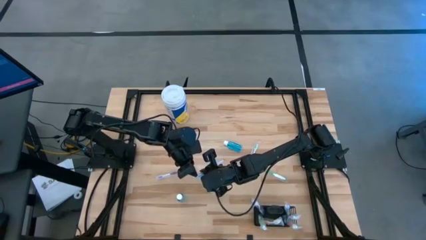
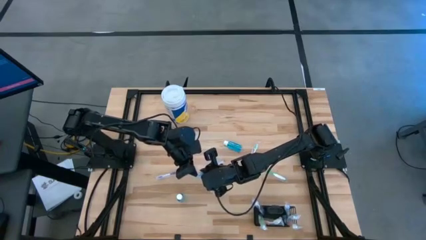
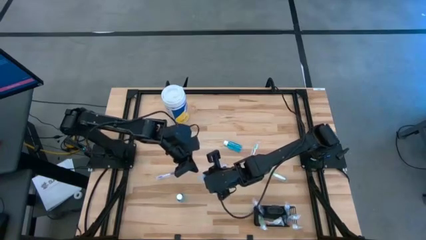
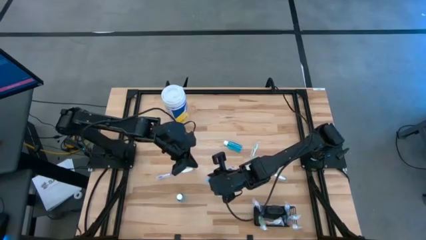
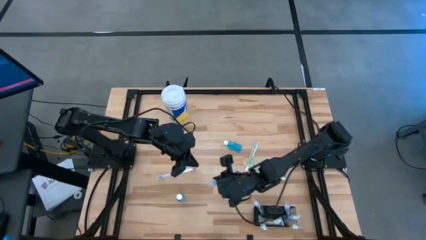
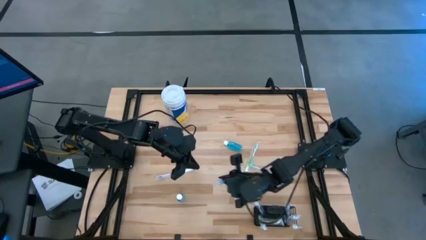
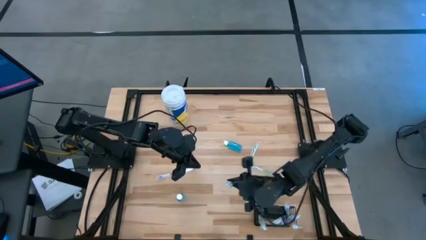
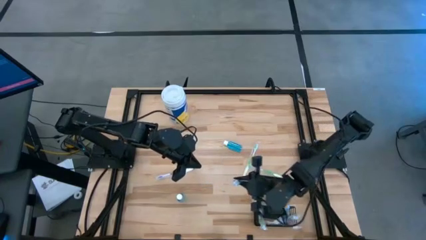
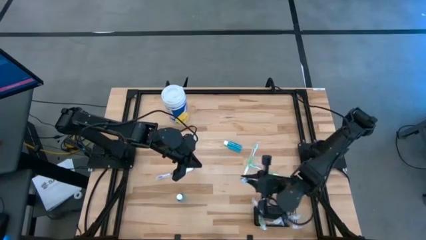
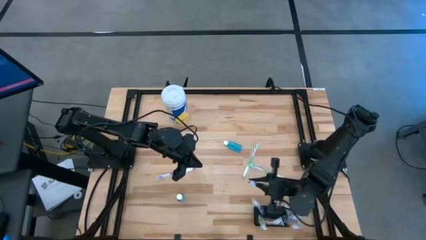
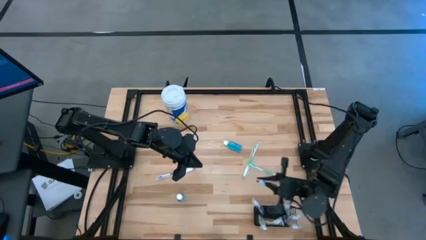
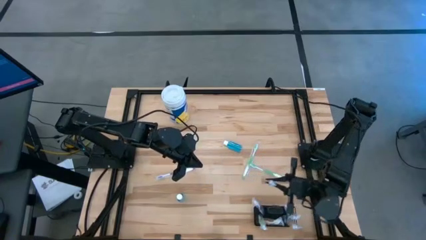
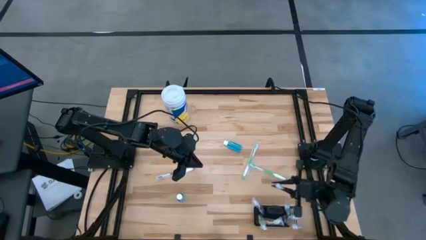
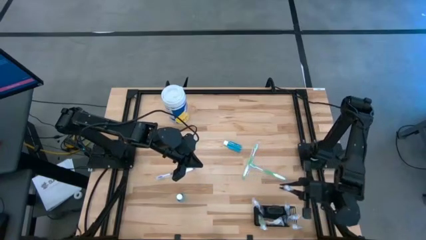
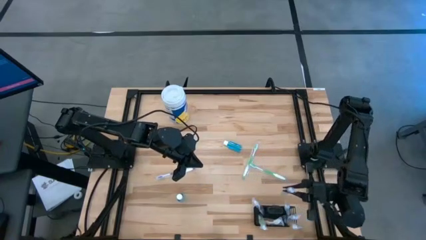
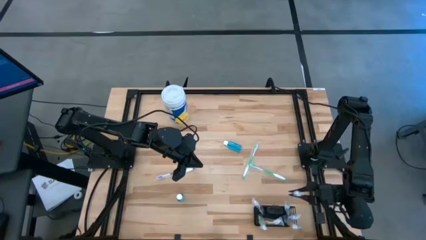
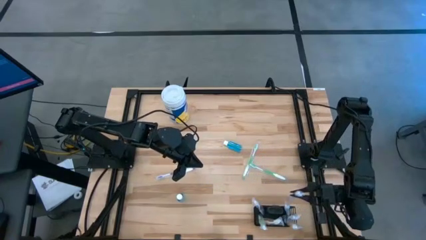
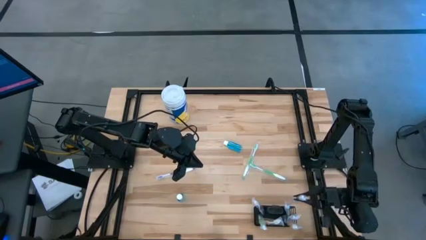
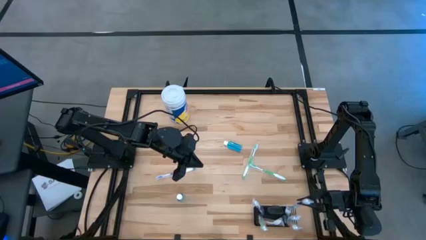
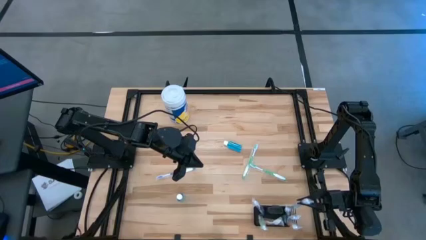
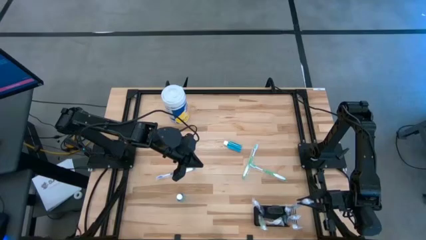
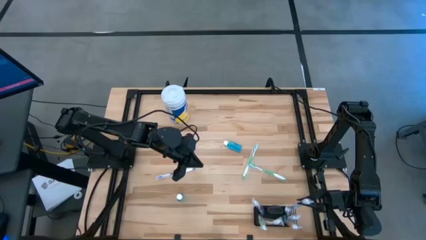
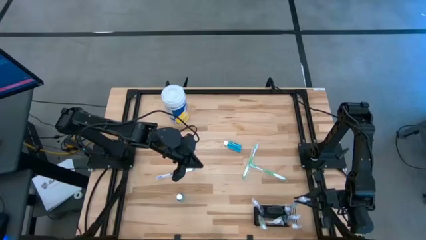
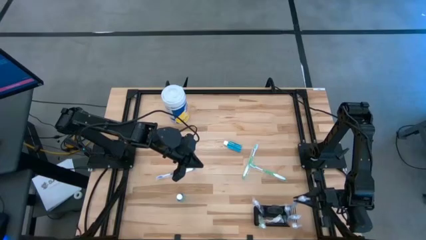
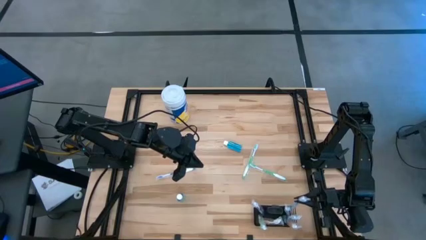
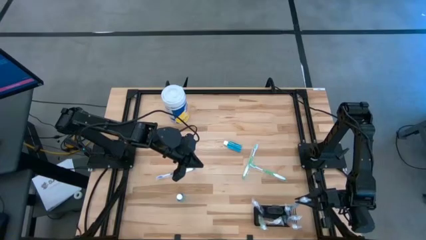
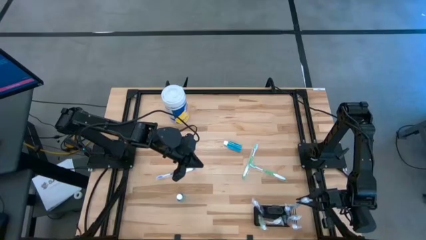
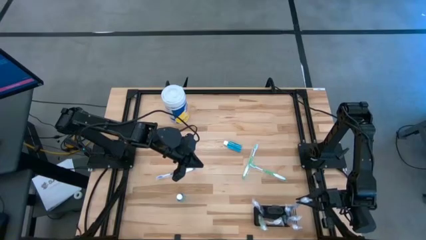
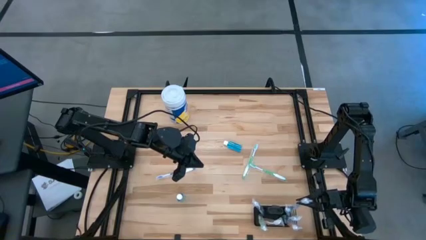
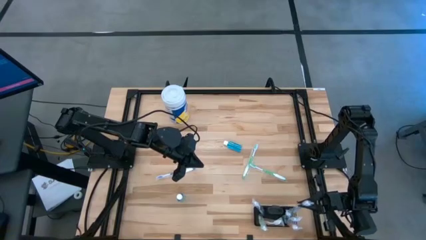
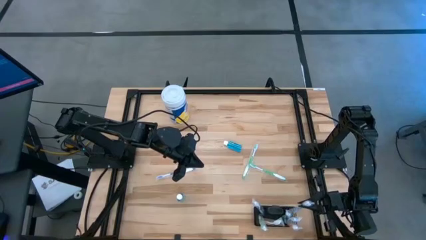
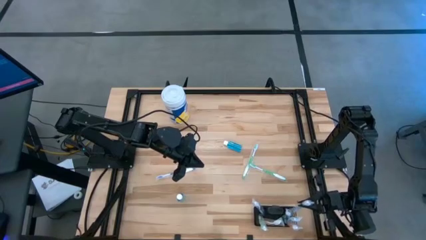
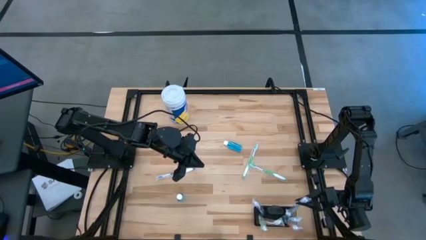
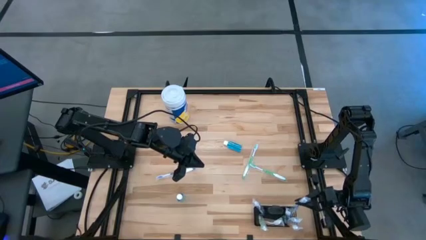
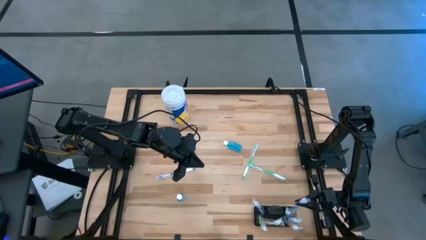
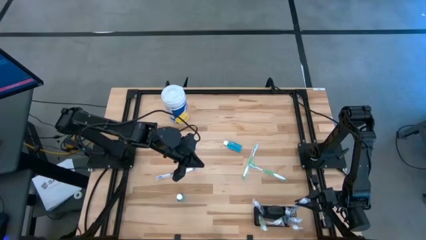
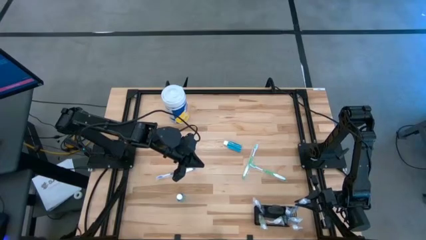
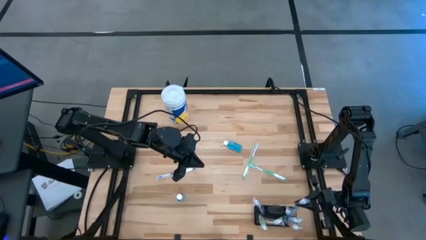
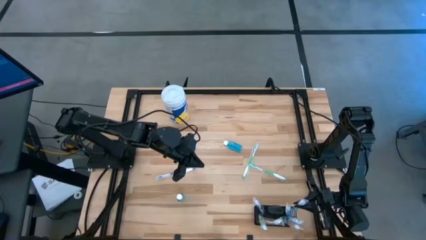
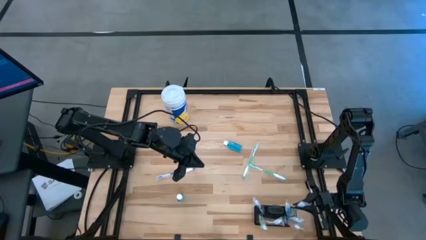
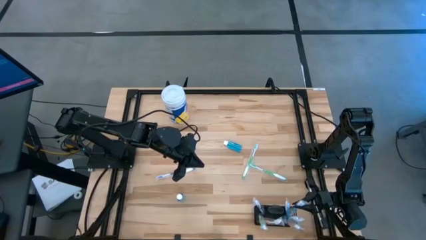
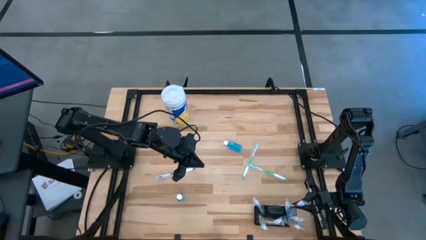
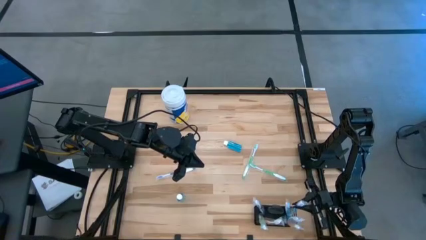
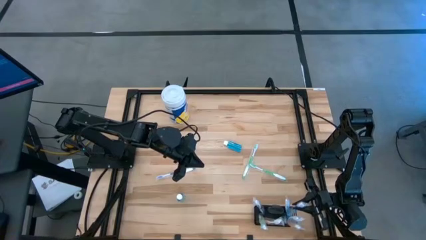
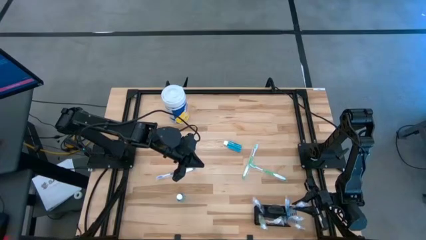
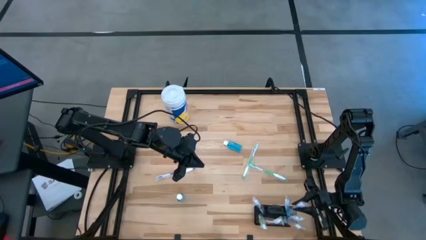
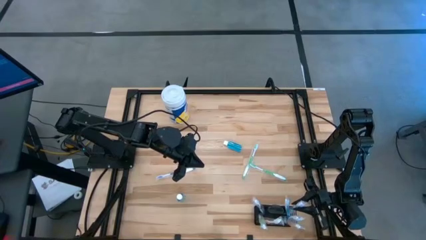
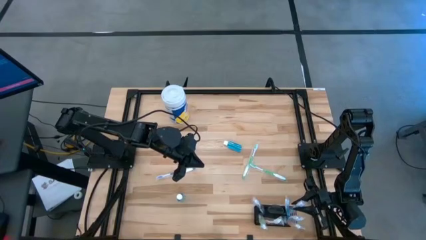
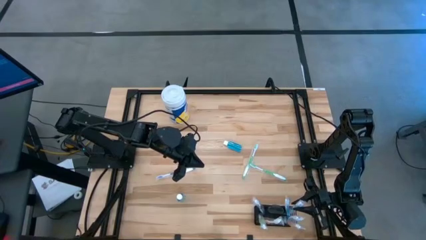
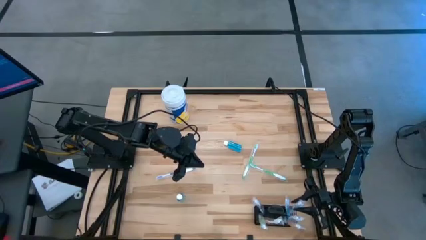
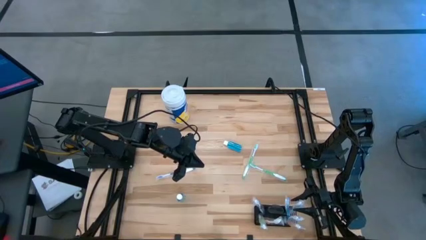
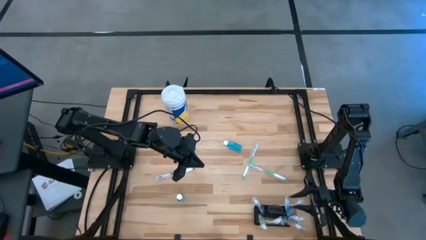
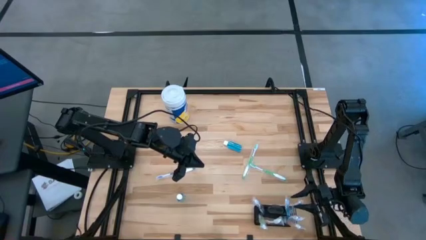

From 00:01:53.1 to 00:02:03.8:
Task: Pick & Place toothbrushing station
Put the blue toothbrush into the wire organizer

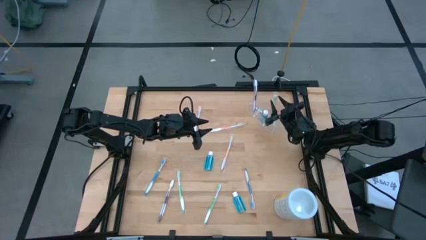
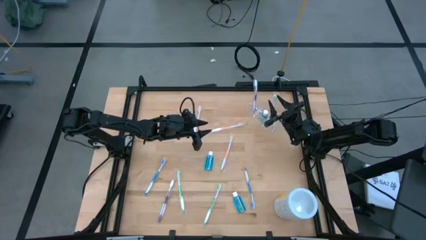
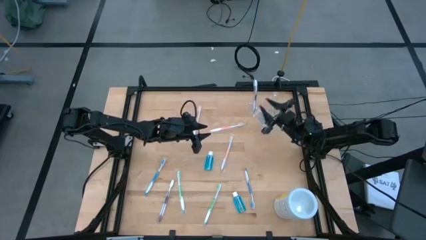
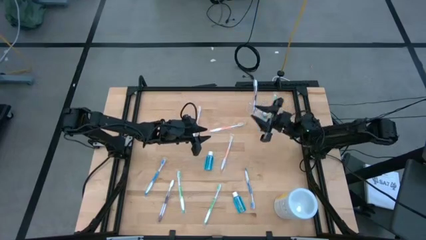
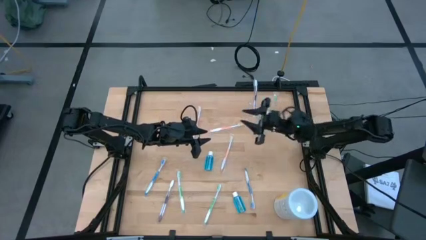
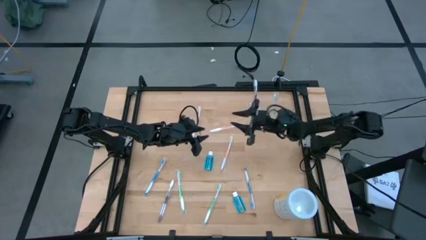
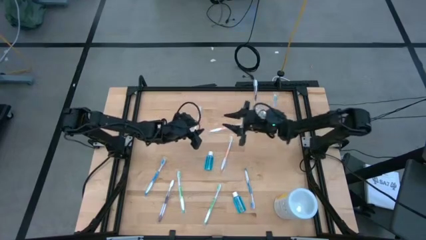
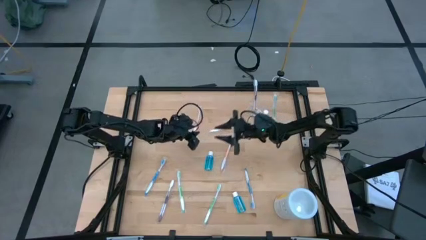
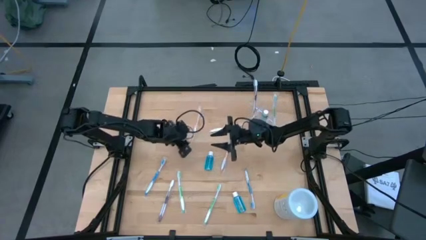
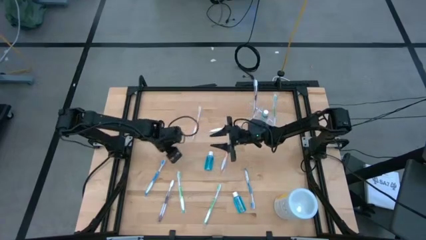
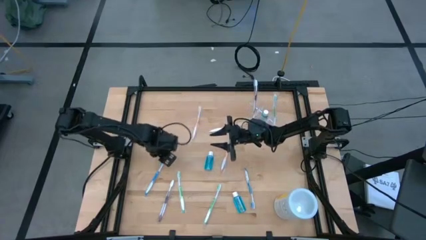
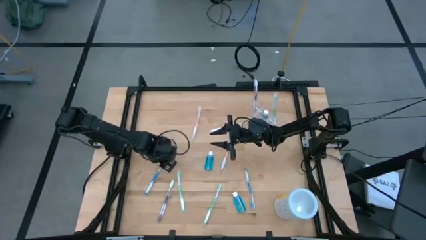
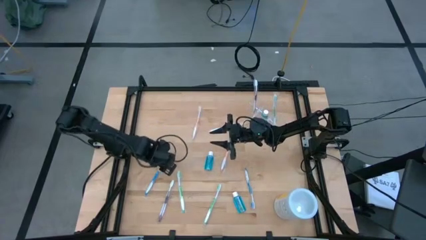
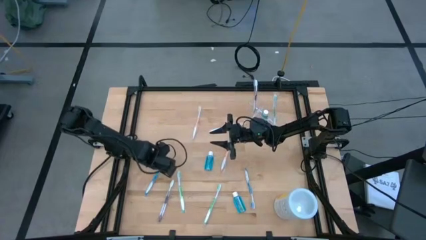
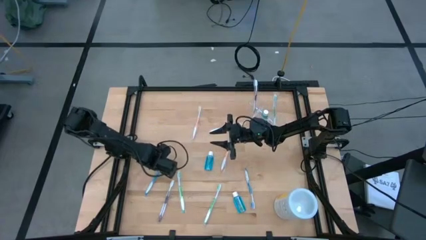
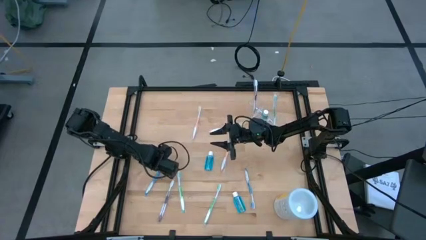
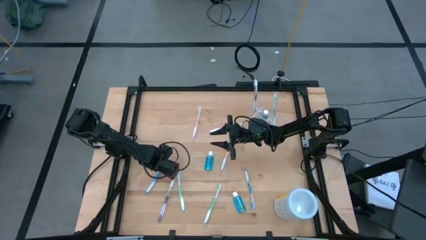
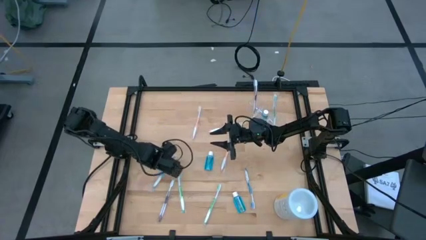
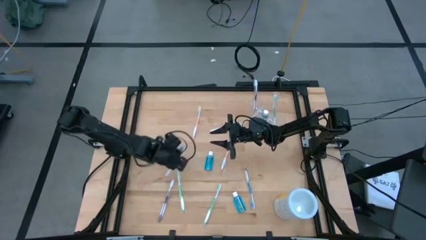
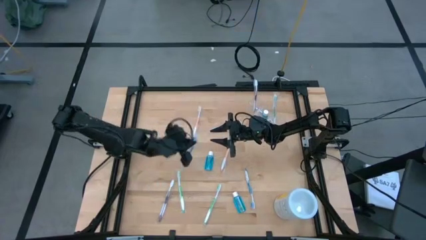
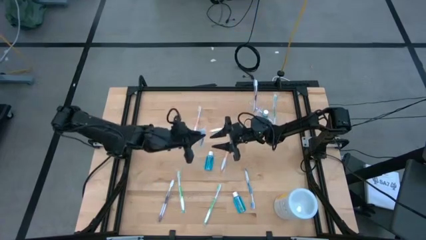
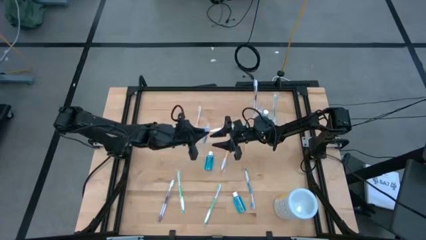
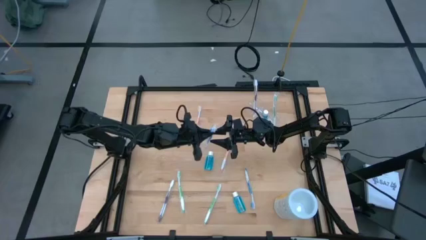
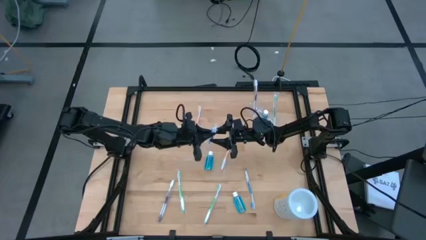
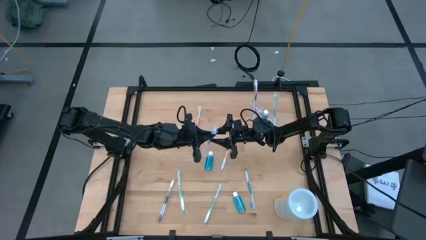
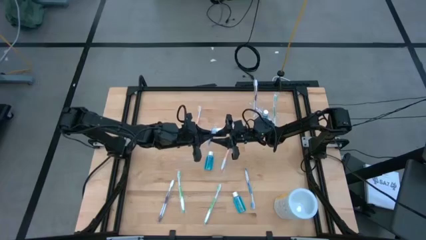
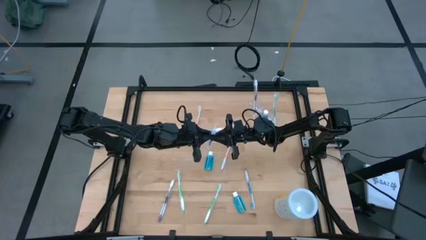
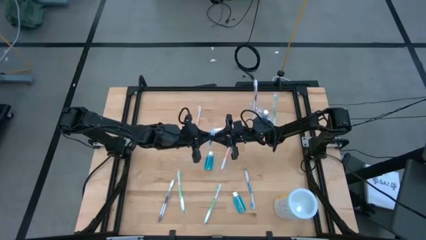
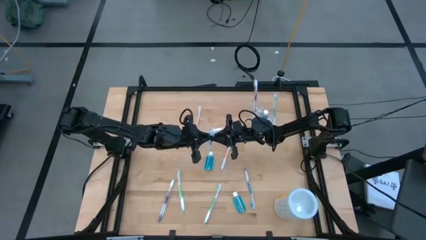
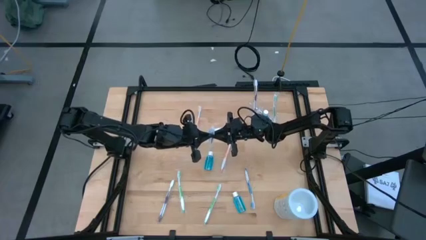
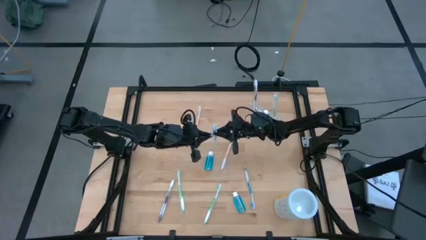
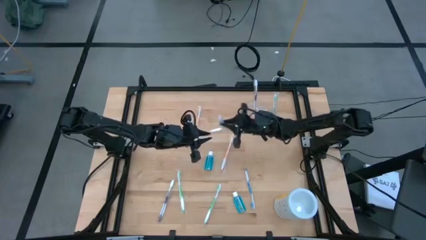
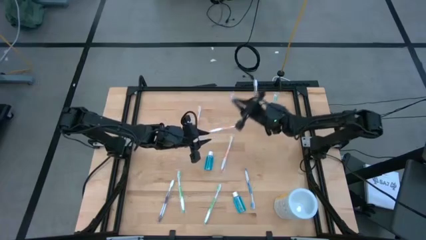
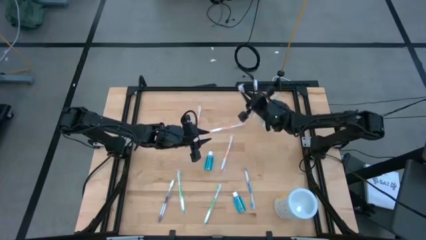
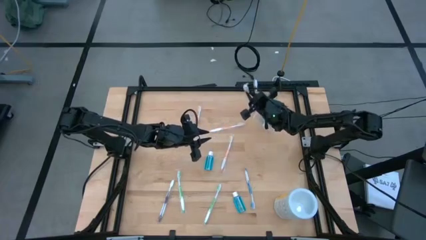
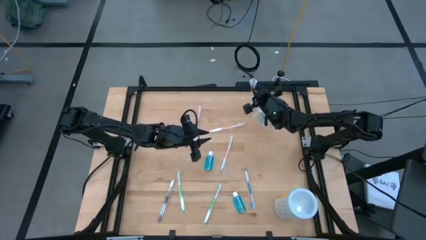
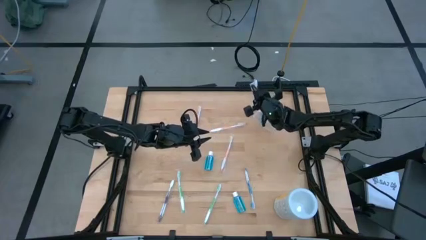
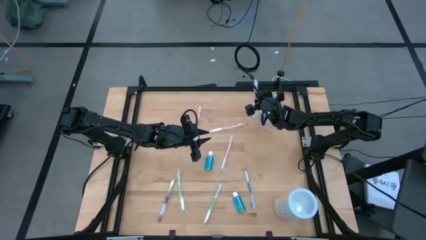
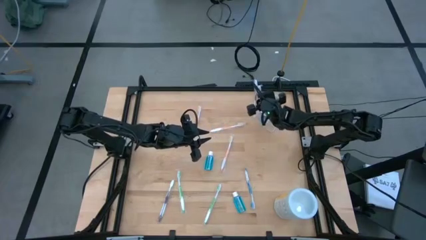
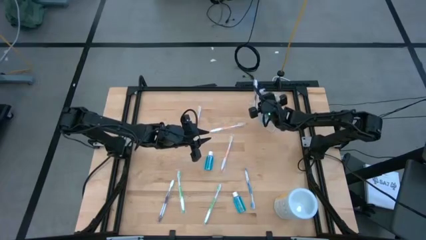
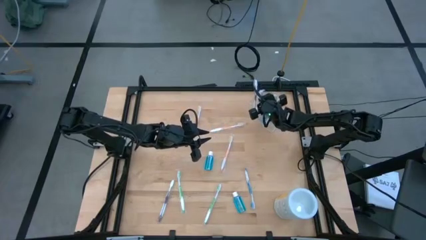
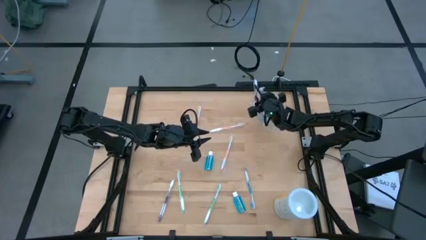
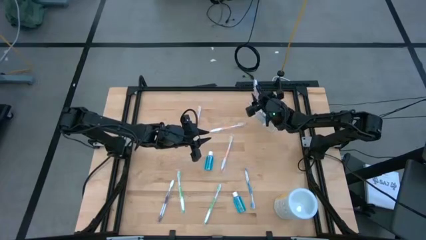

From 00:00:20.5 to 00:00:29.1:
Task: Pick & Place toothbrushing station
Put the left blue toothbrush into the transparent organizer
